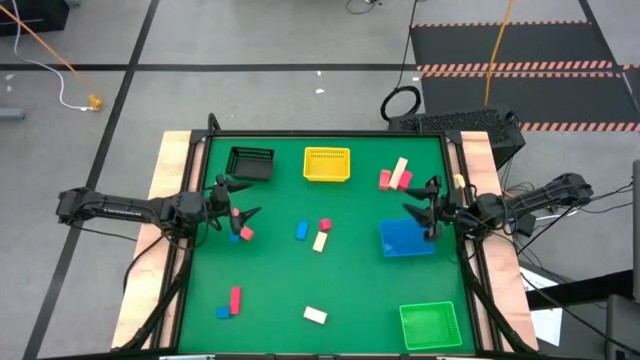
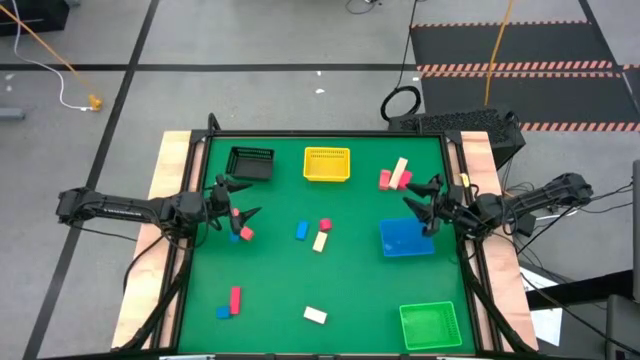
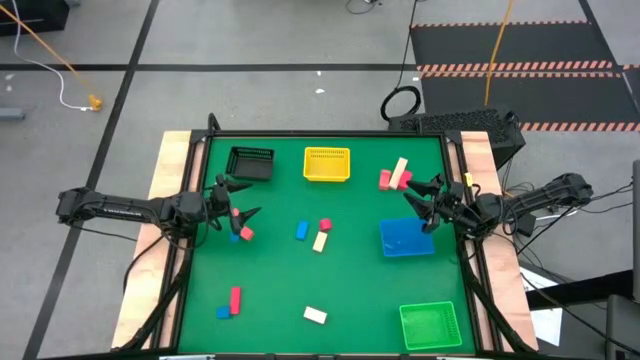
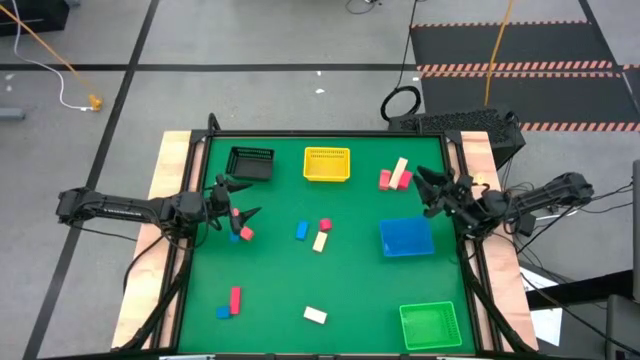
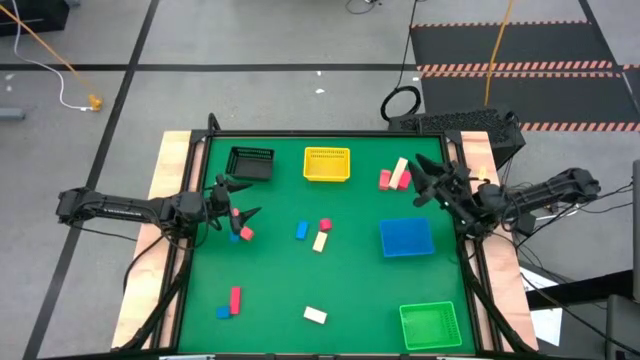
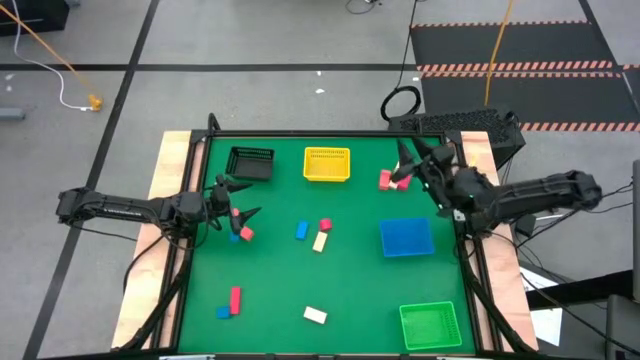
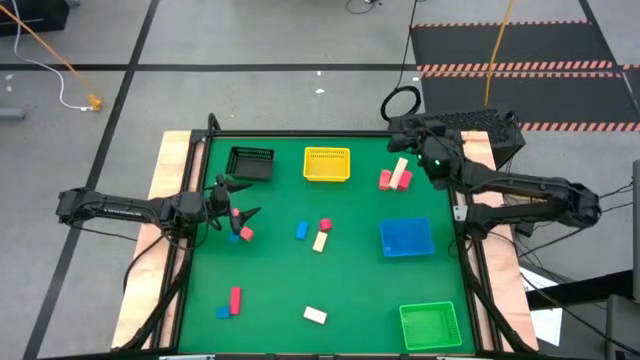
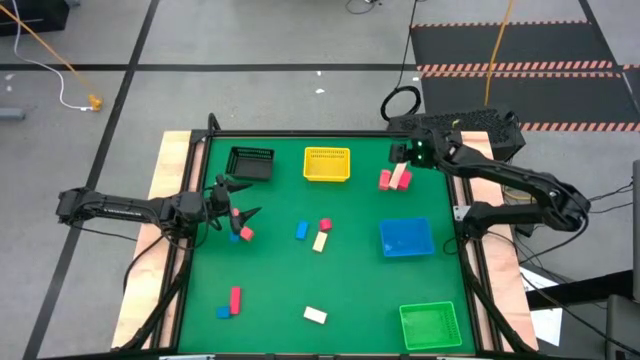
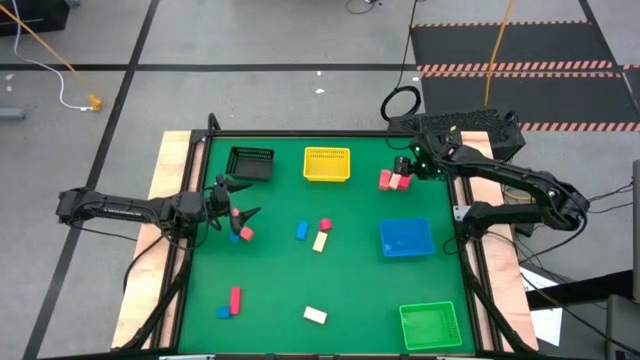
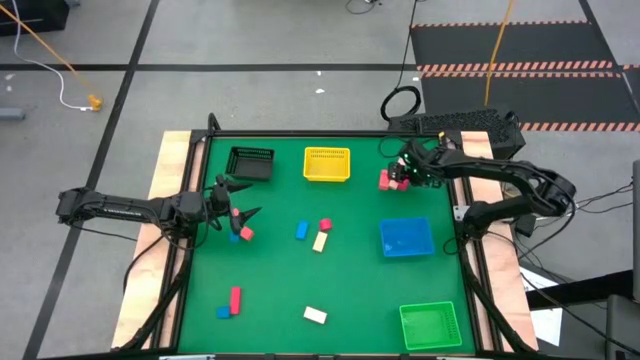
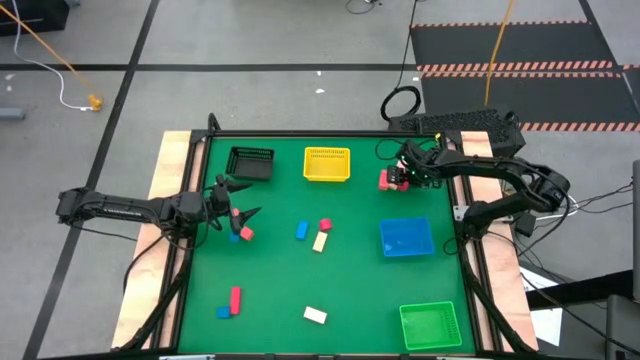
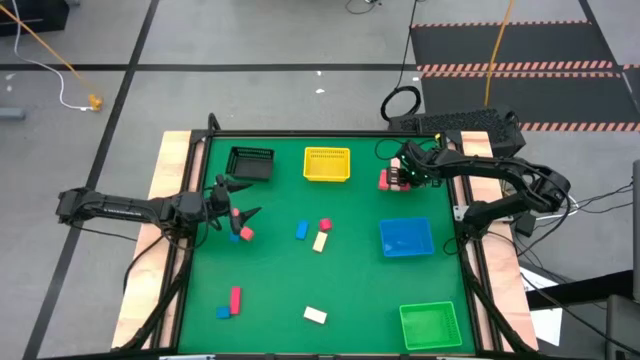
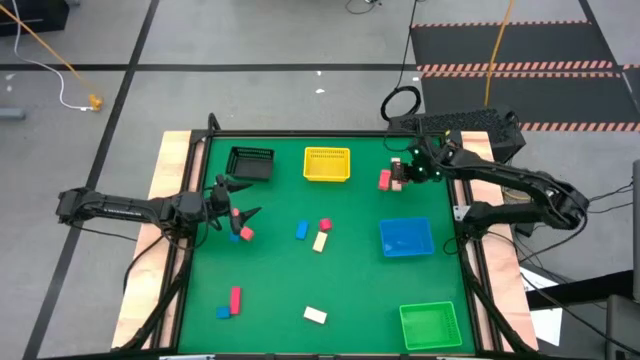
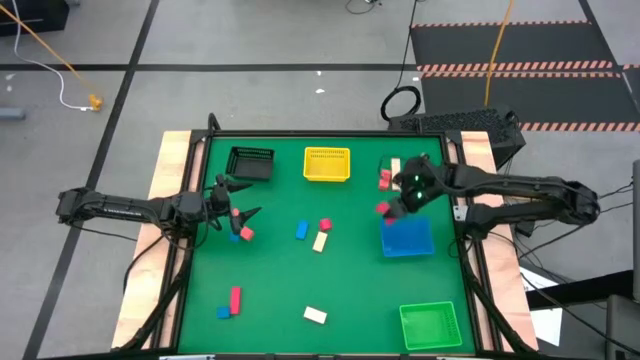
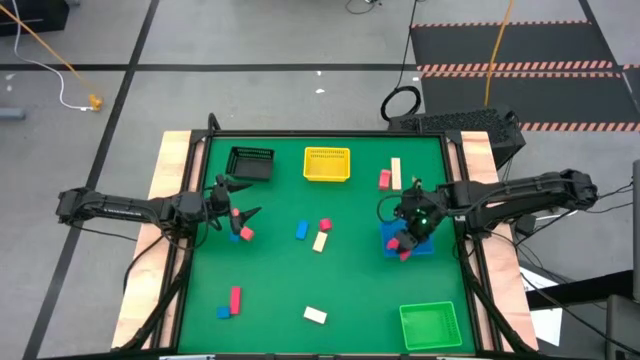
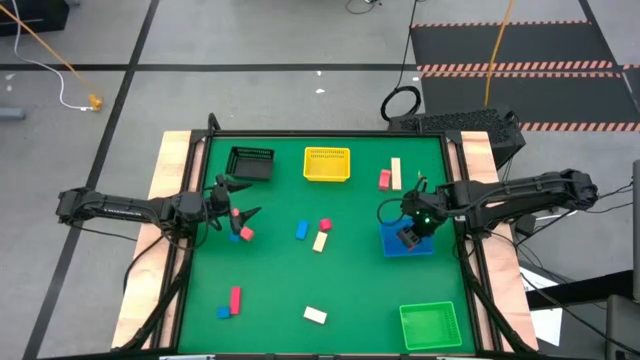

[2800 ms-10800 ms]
Task: Sort & place blocks by color
Put the top red block into the blue bin

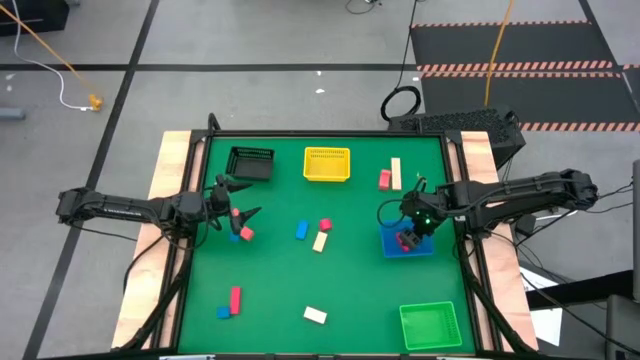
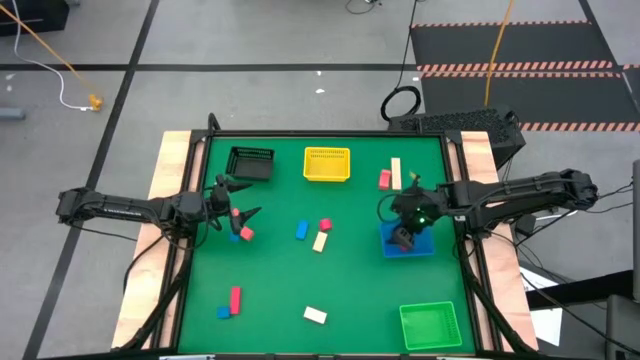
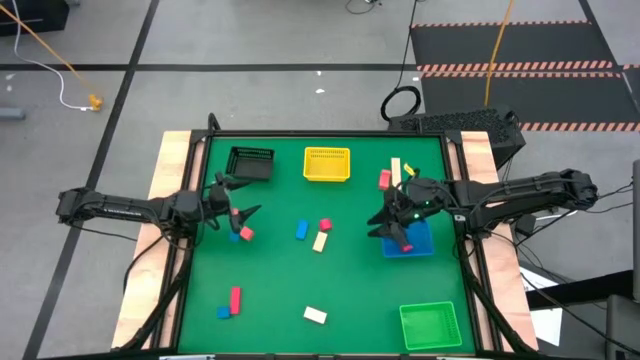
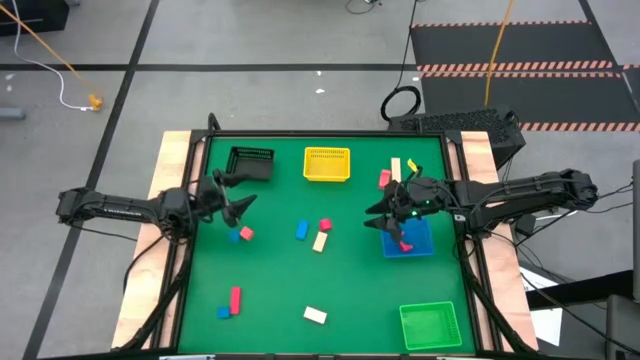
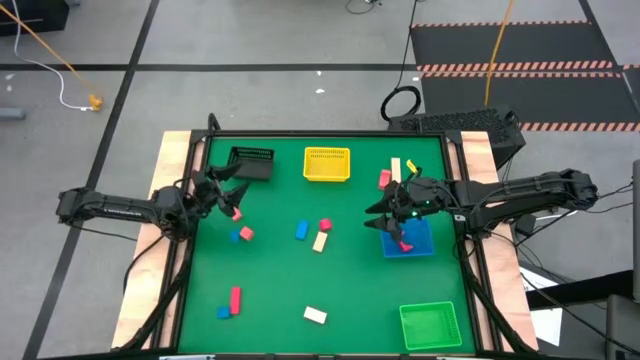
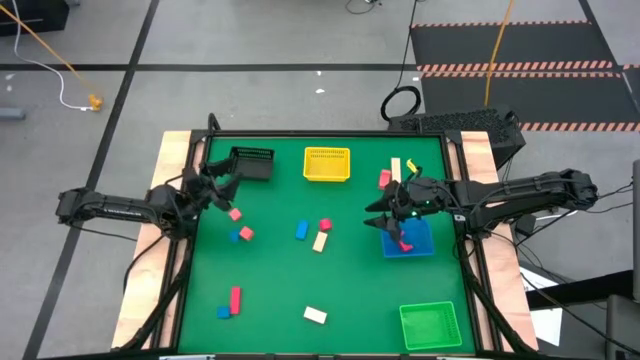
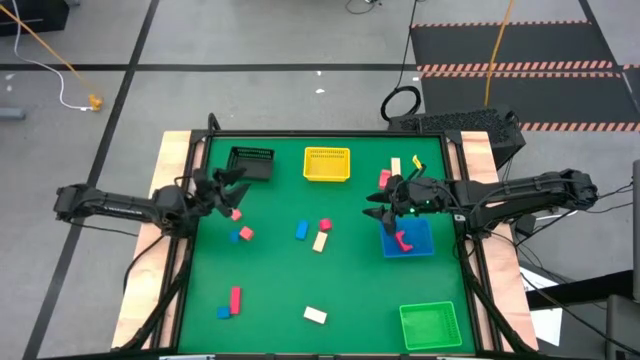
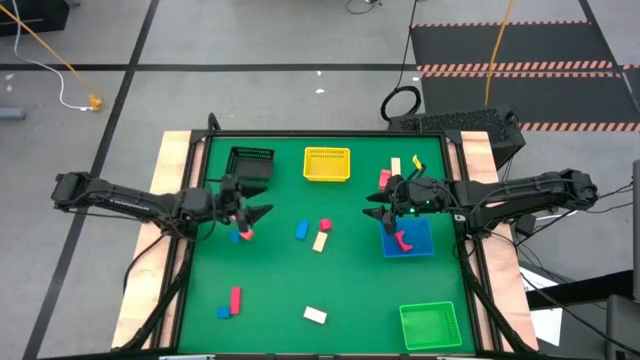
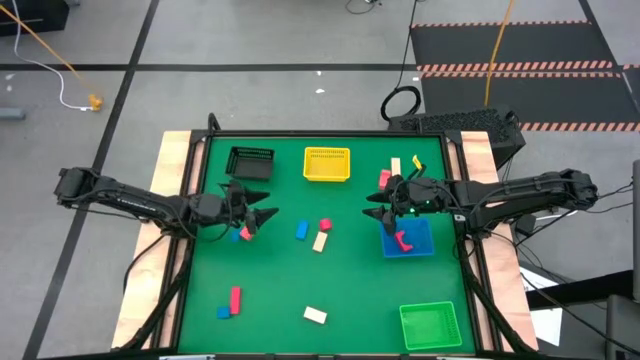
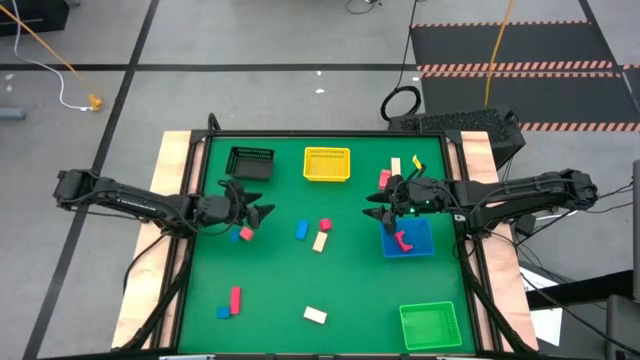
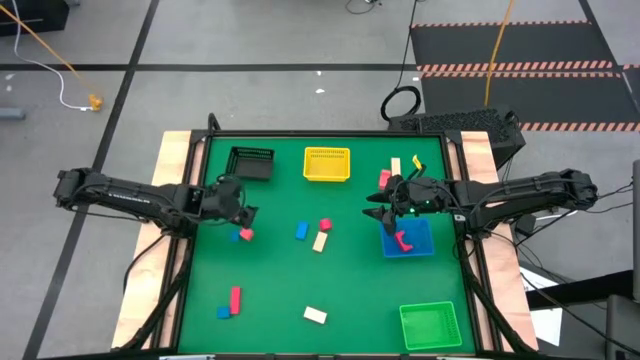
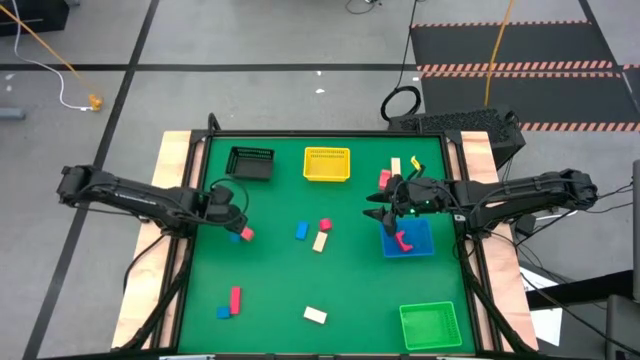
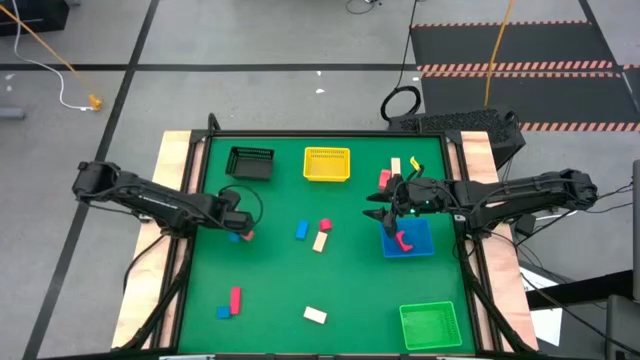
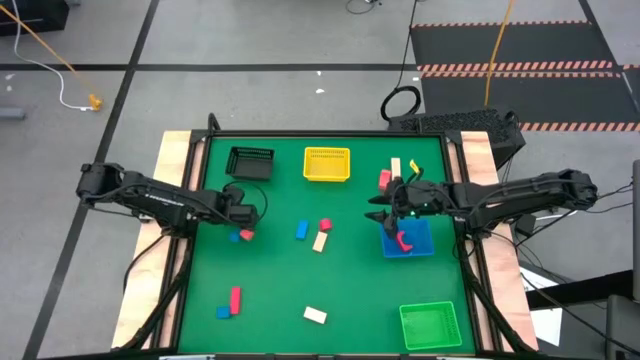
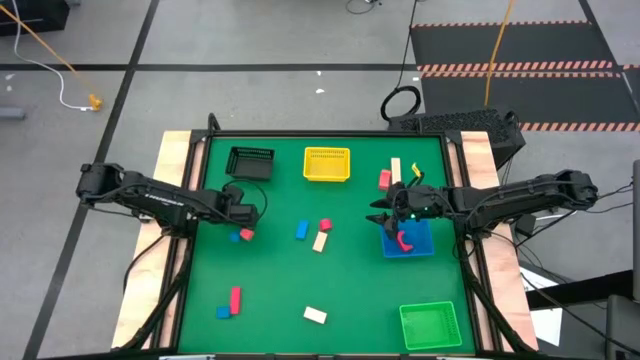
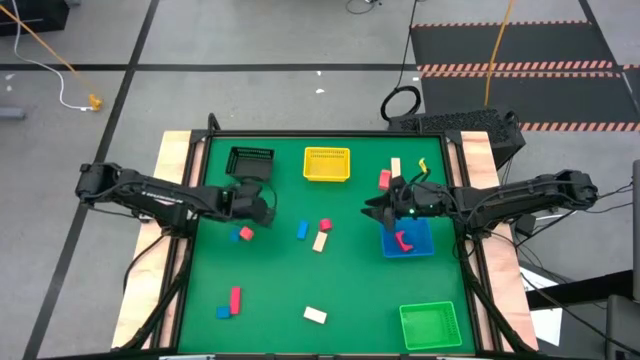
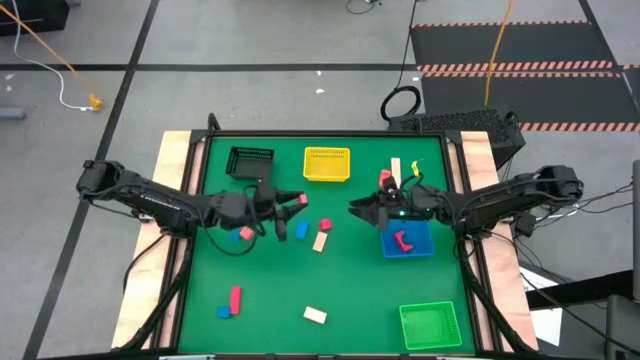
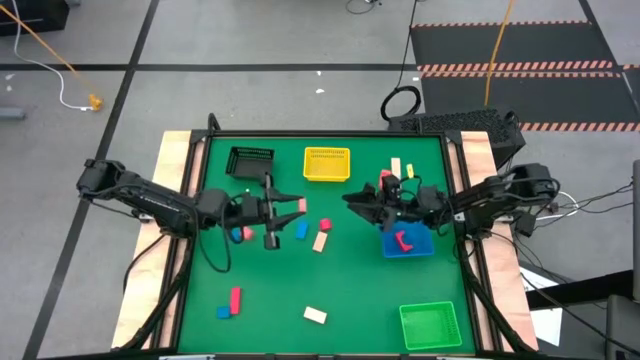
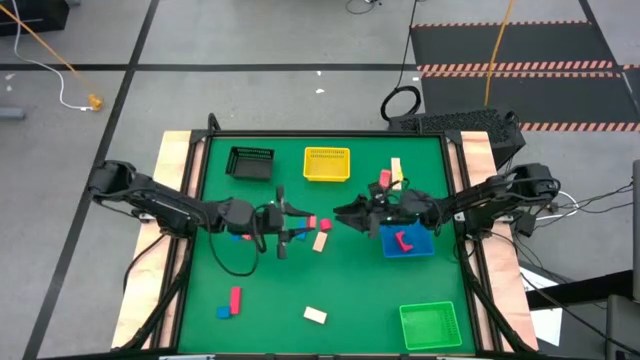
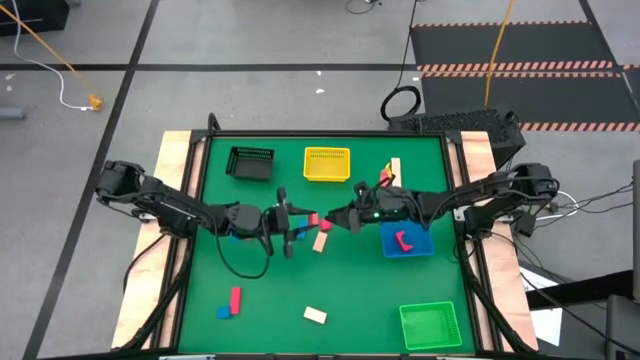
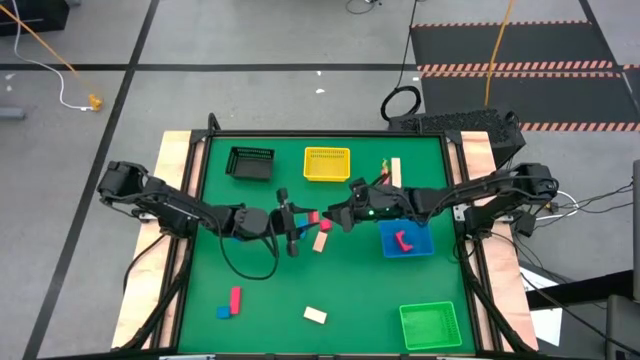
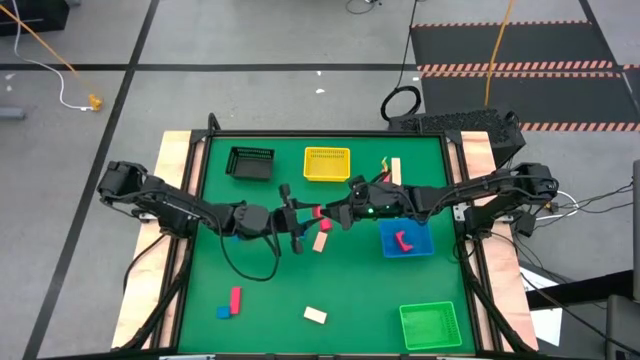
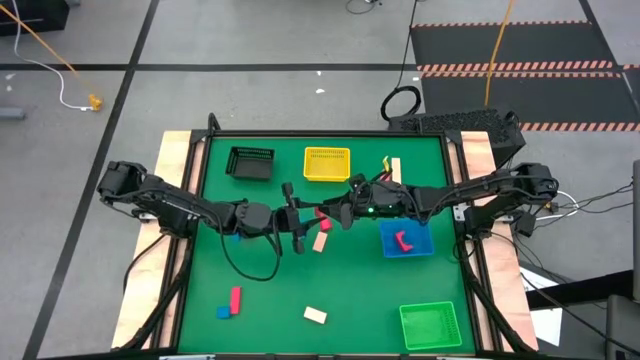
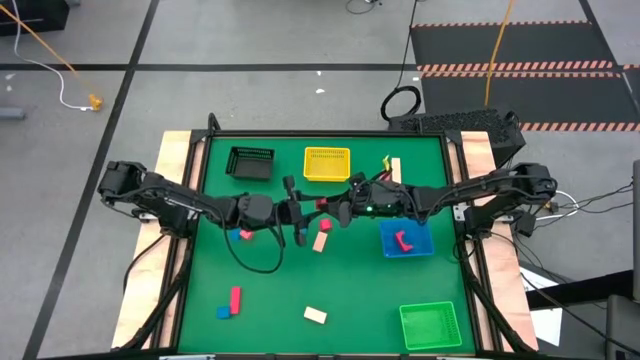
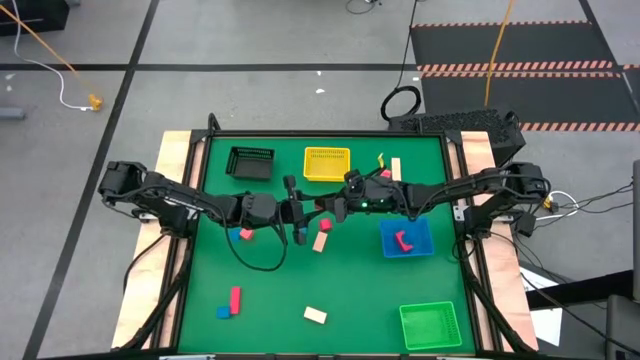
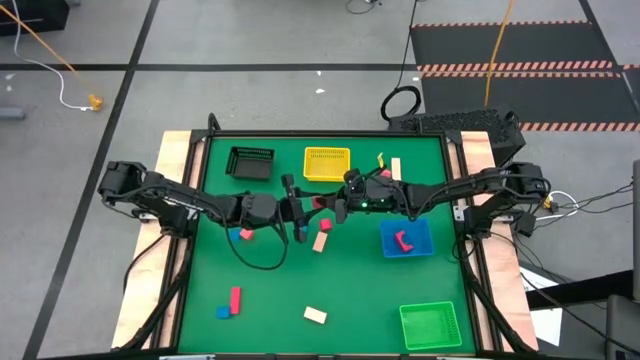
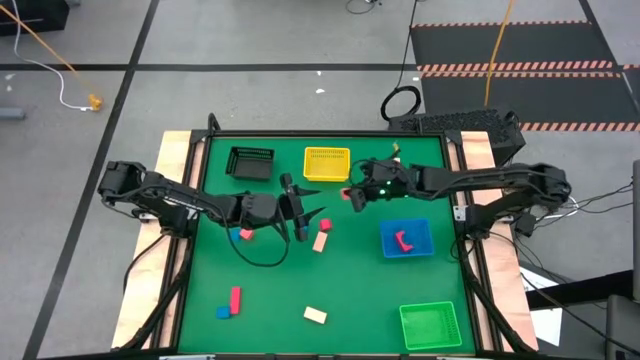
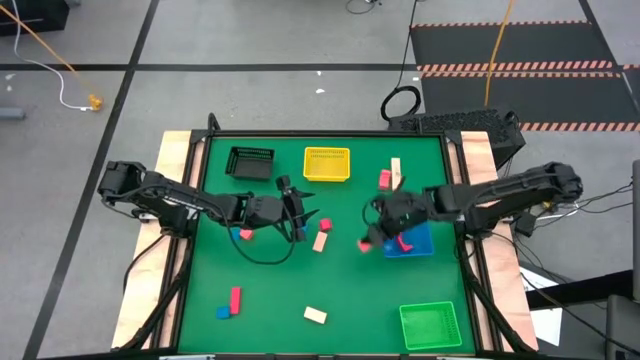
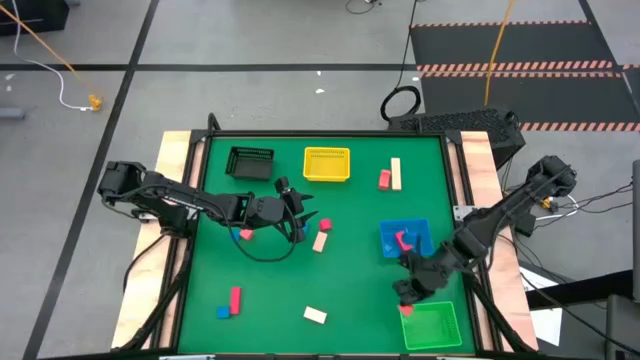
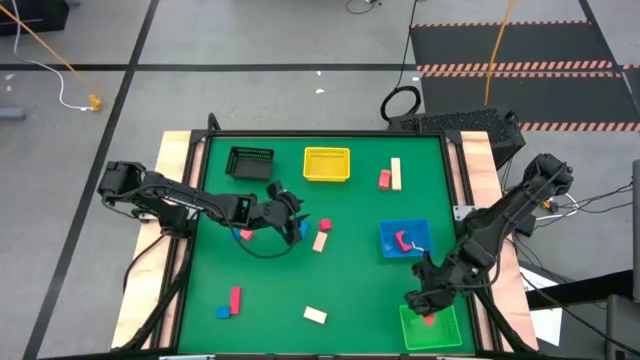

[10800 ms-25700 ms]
Put the middle orange block into the green bin
